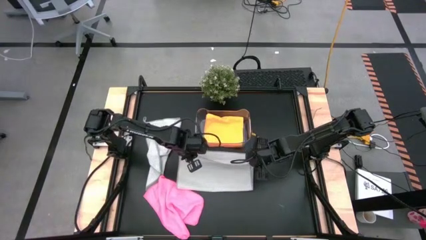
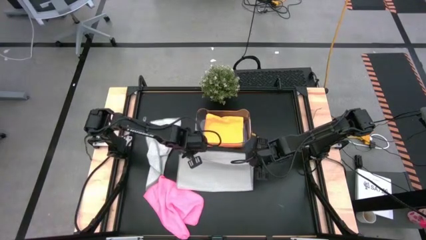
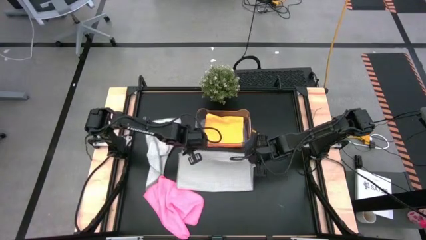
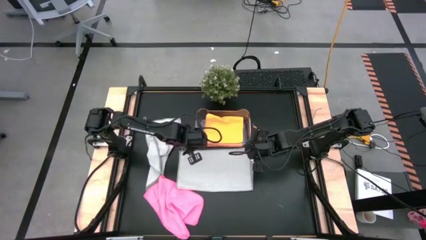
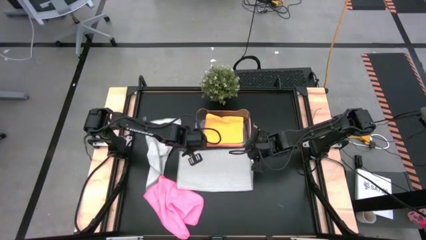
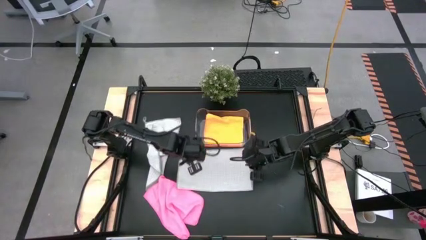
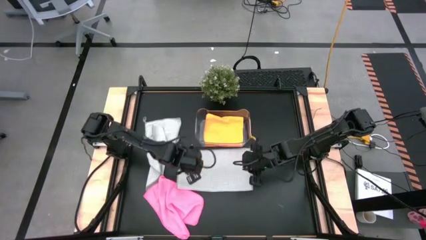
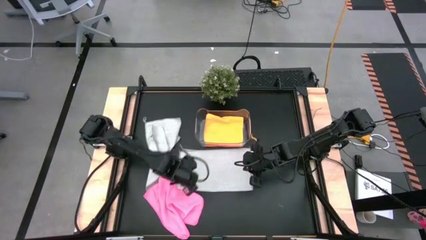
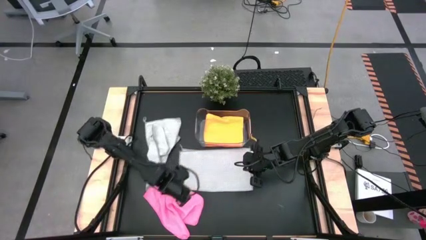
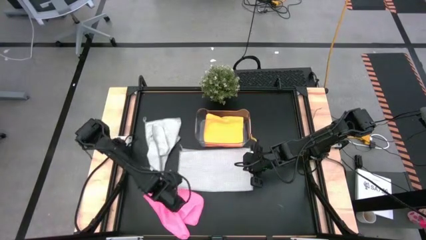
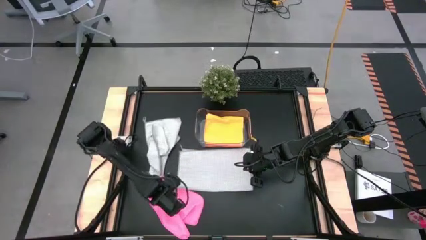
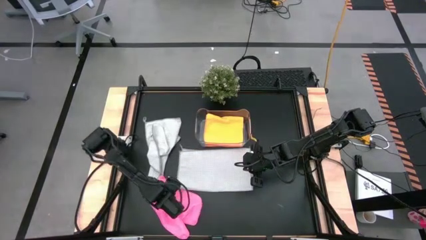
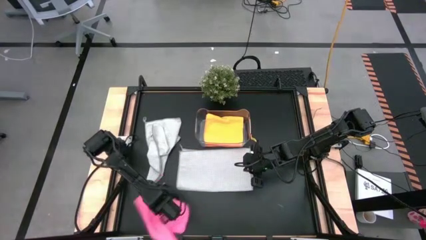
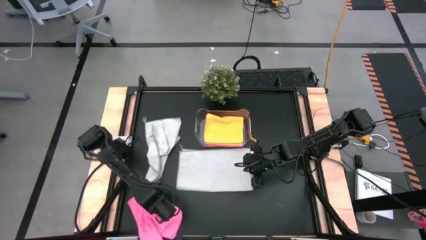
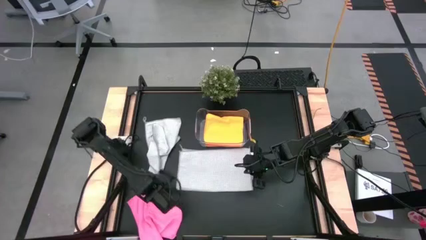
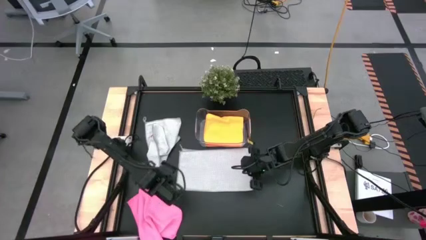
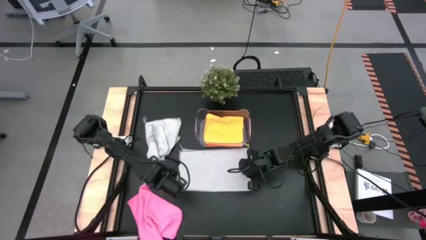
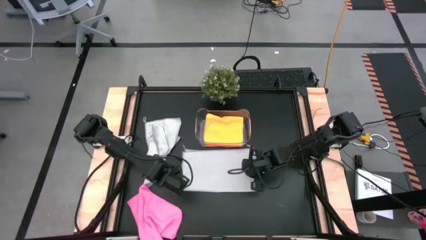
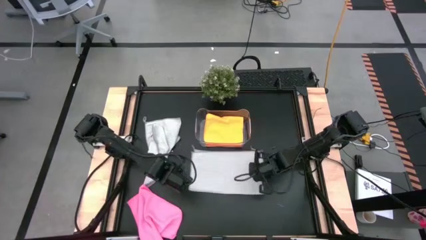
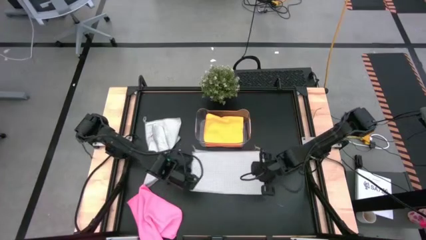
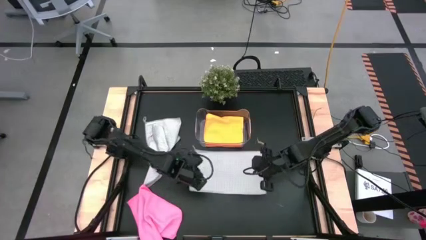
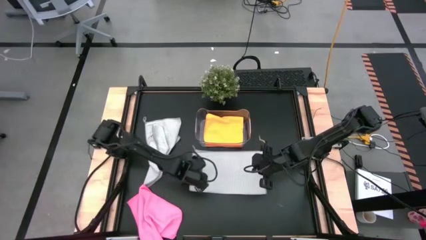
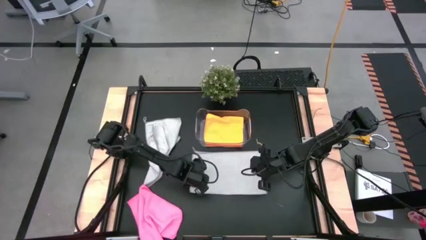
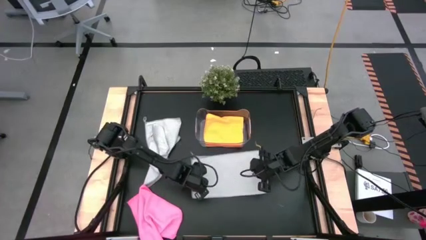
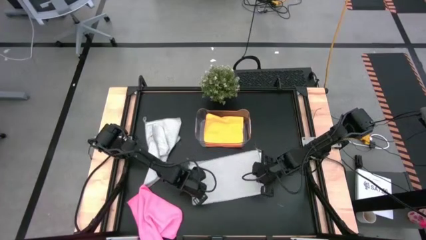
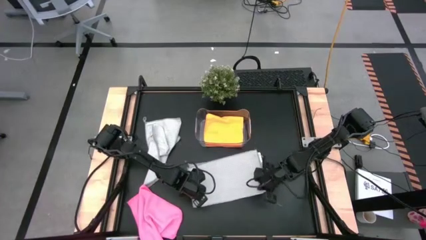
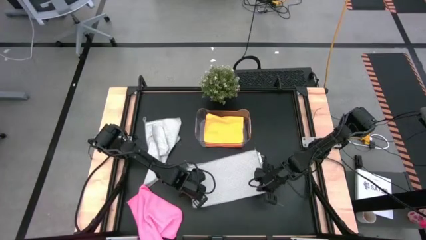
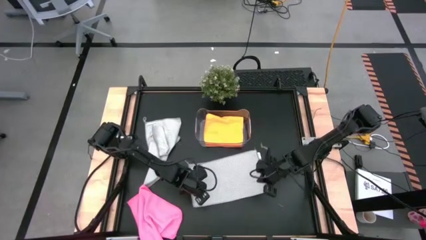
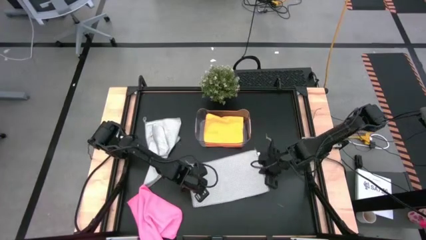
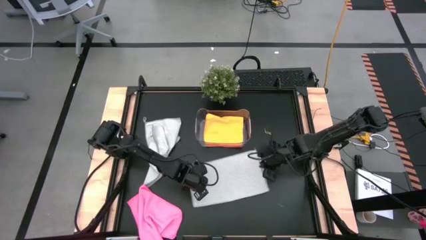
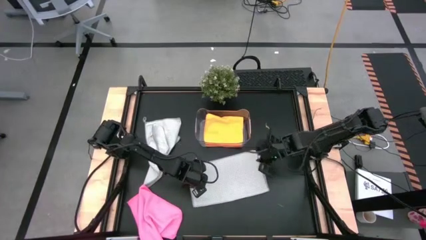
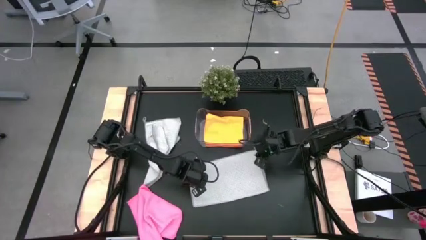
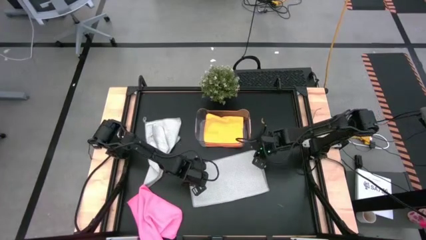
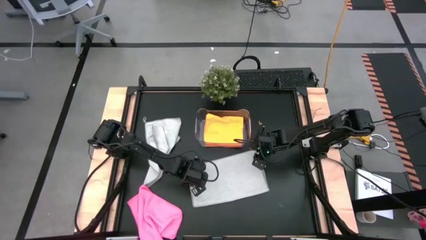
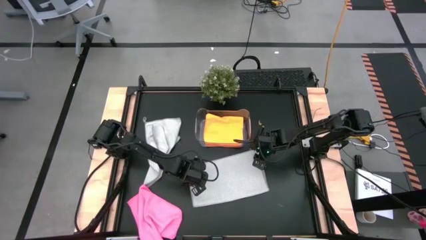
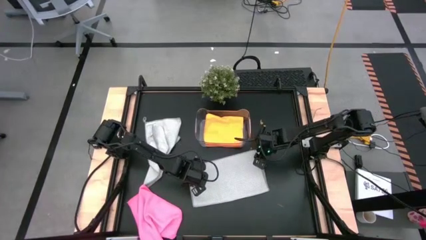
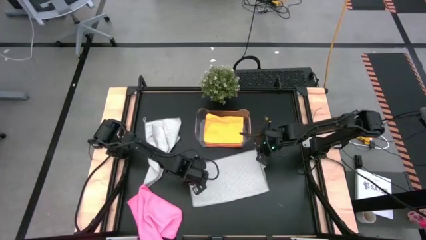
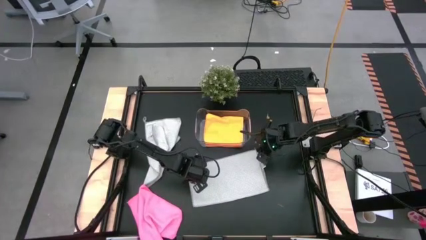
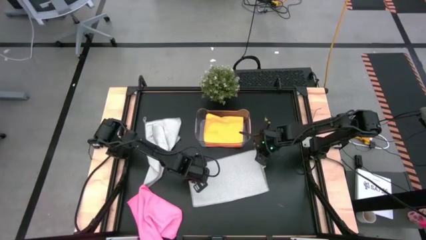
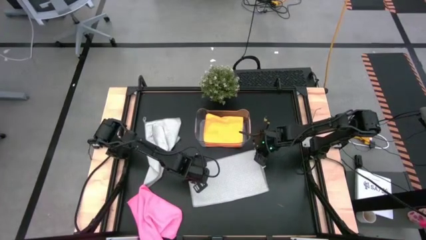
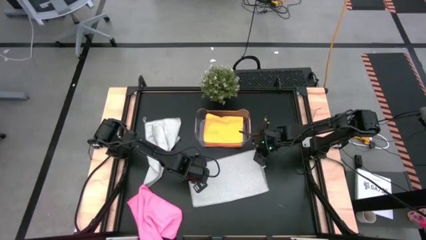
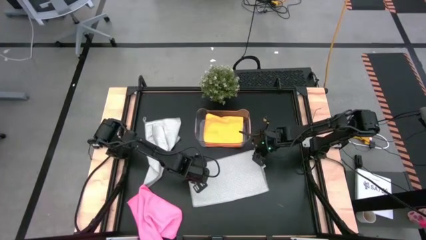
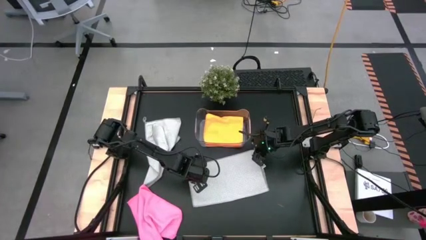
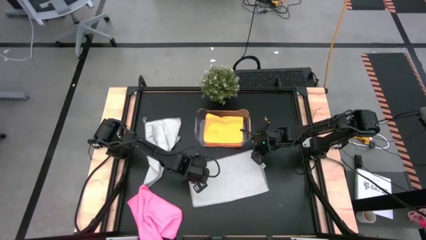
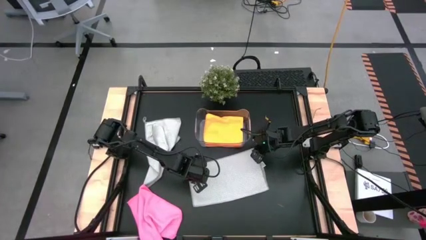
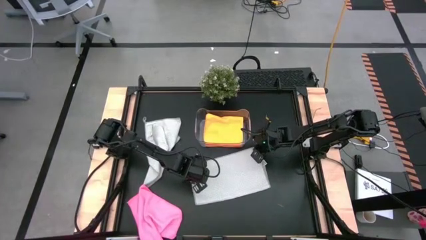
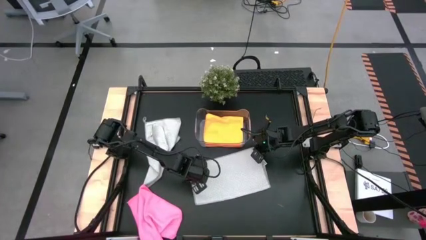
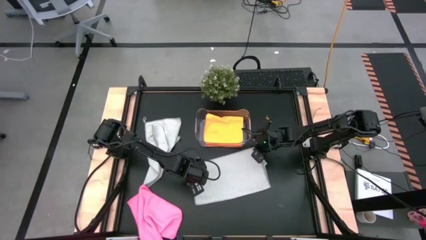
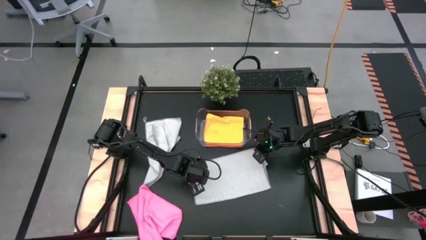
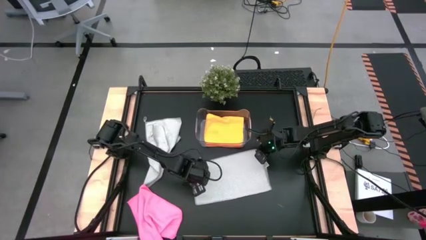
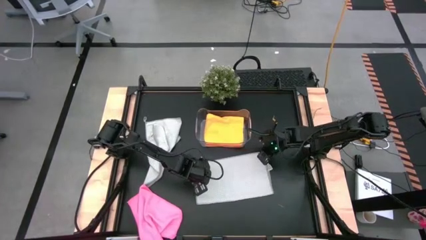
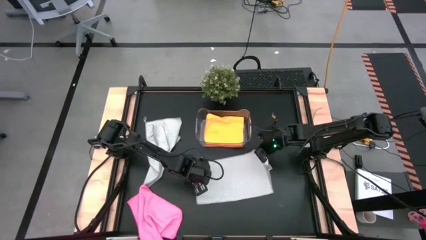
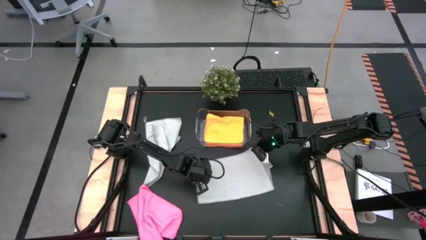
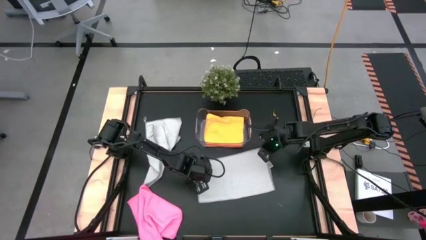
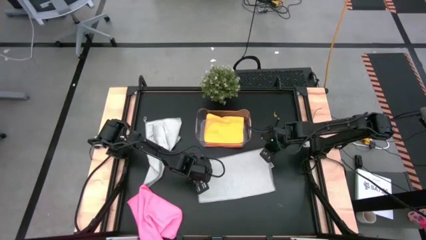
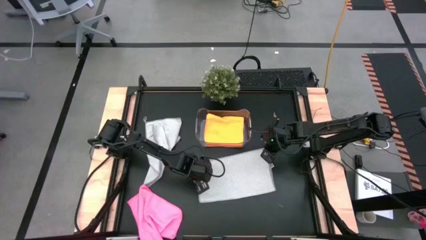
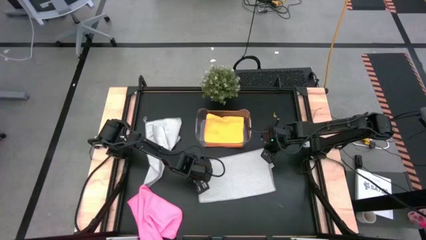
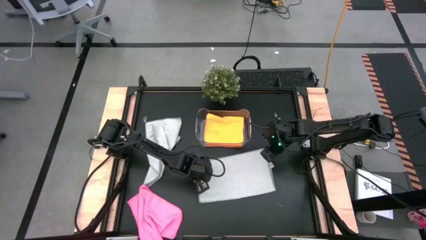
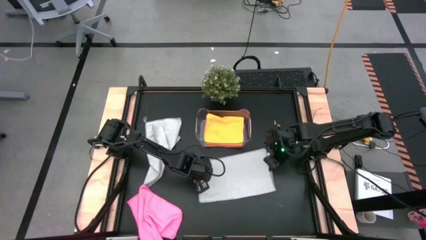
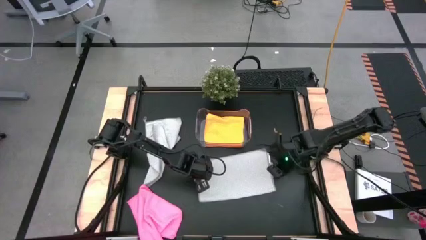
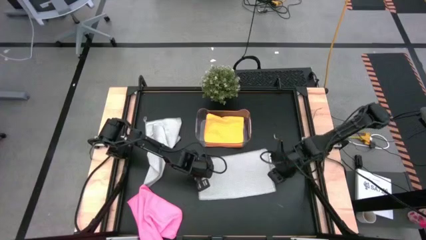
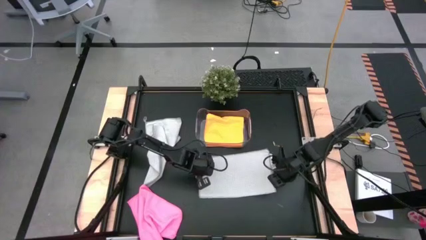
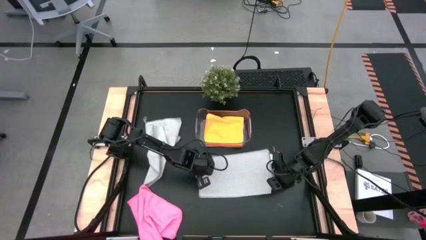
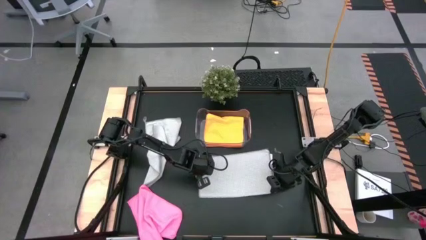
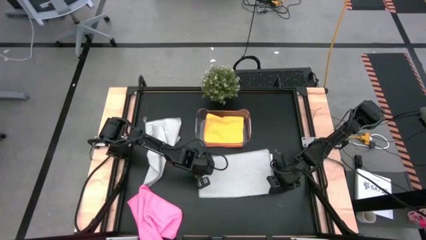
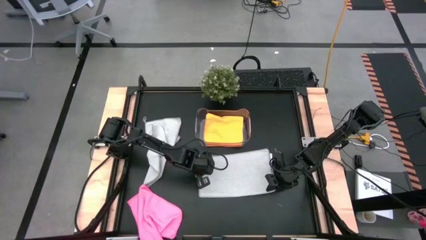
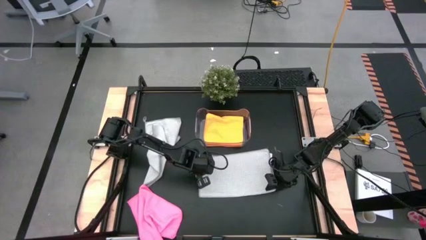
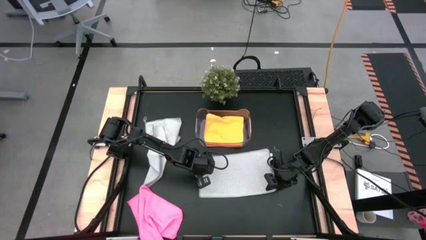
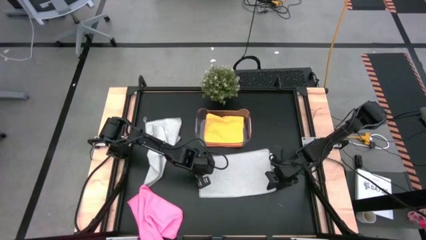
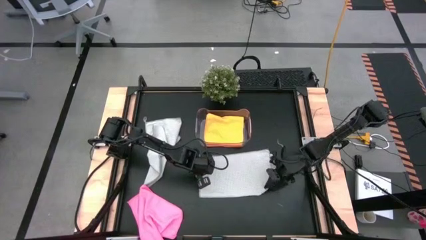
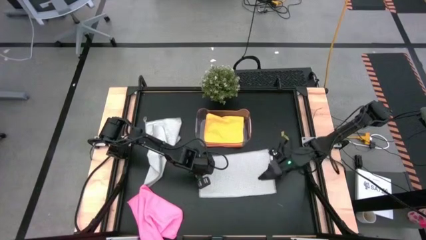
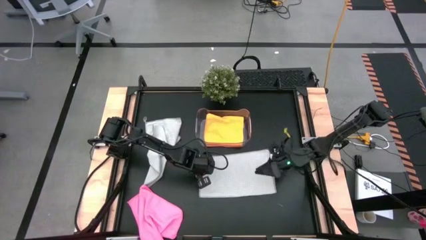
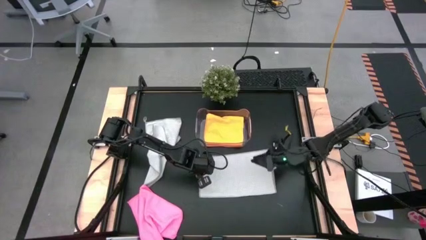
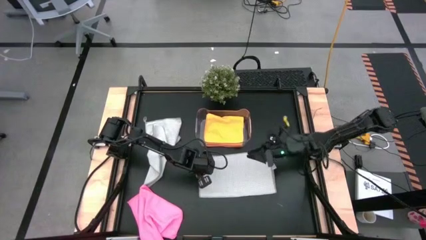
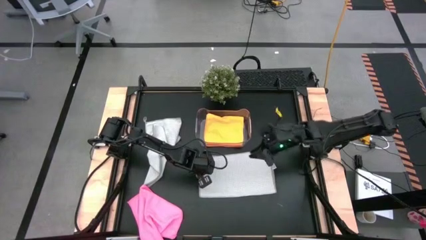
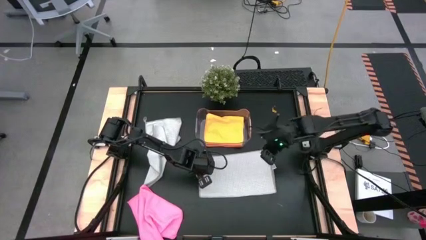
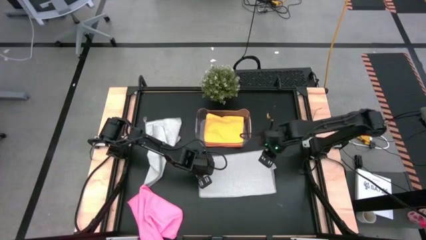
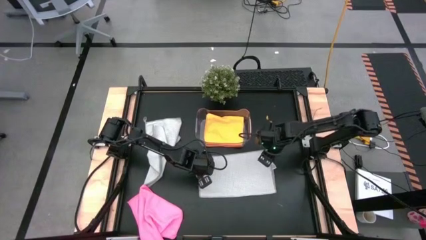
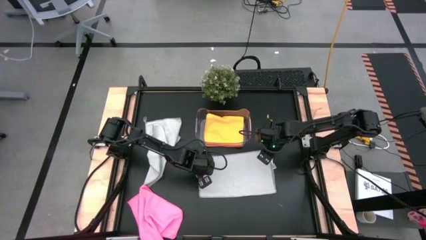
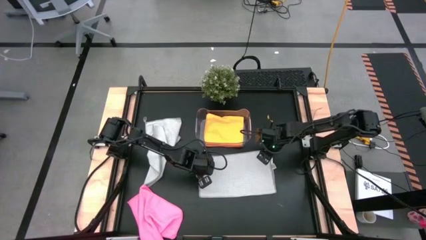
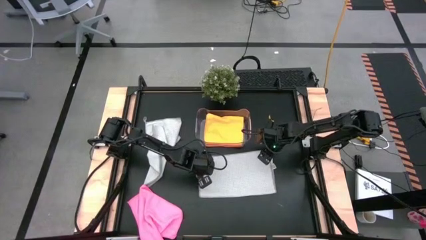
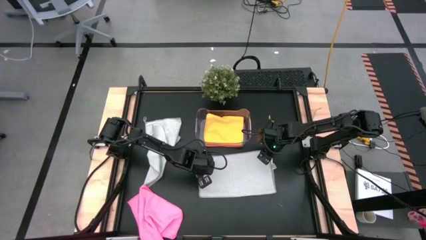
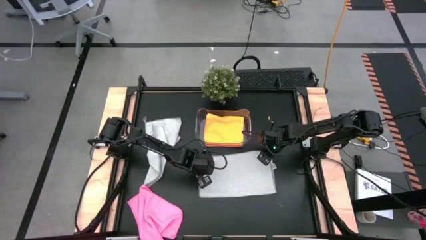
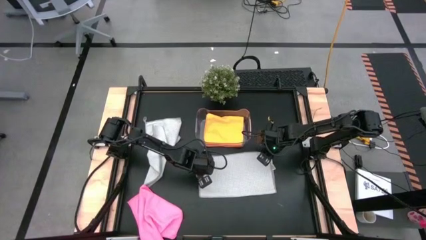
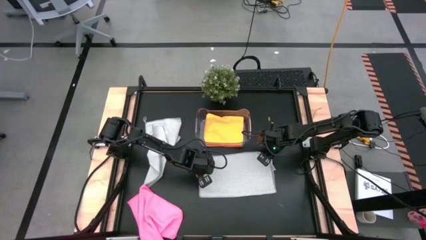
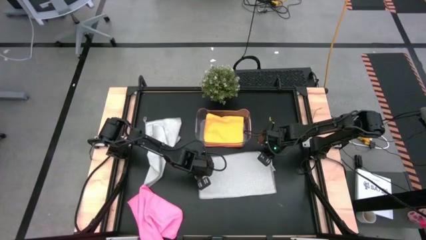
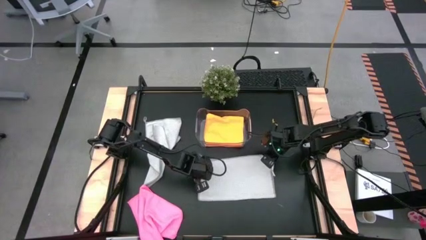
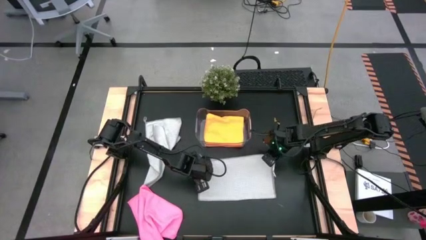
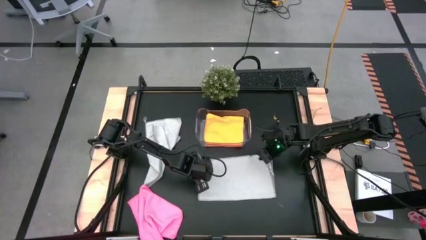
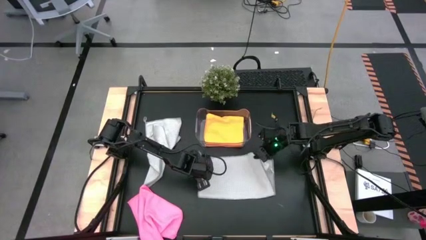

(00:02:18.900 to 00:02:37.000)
Task: Fold microfiber towels
Fold the bottom gray microfiber towel on the table
